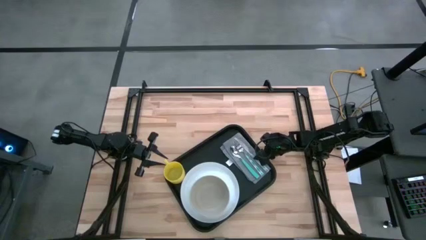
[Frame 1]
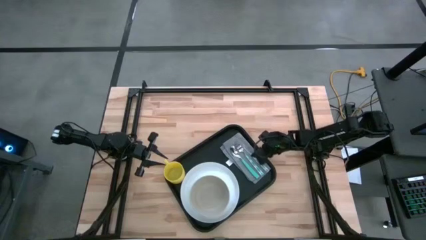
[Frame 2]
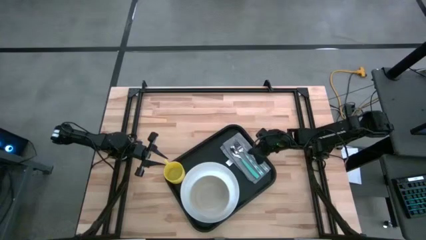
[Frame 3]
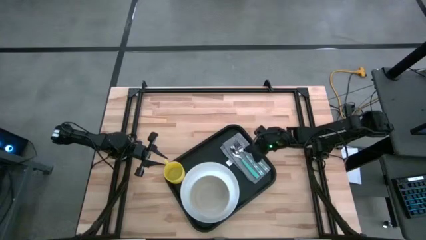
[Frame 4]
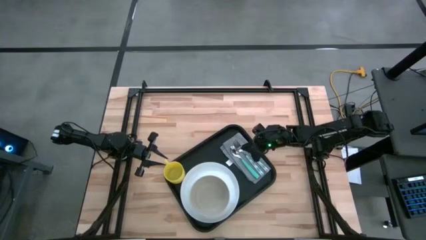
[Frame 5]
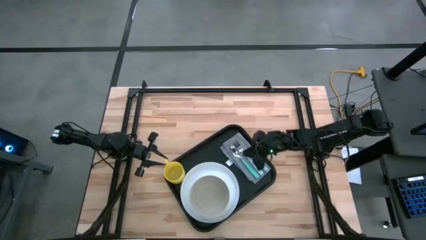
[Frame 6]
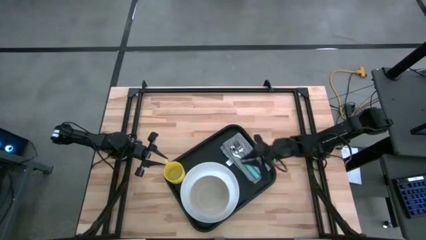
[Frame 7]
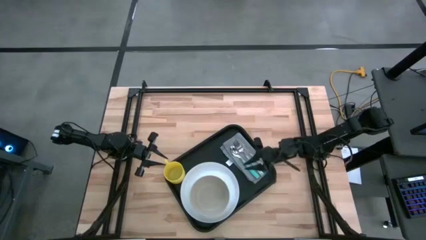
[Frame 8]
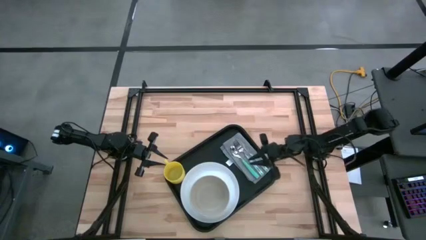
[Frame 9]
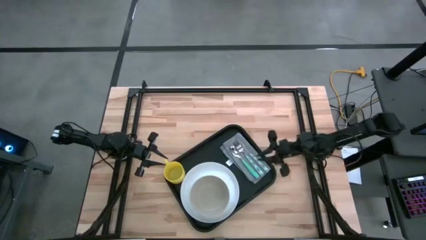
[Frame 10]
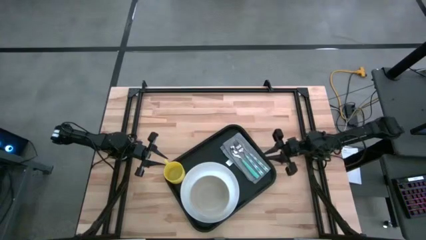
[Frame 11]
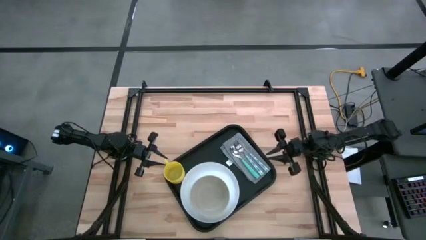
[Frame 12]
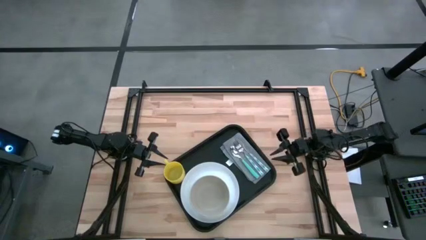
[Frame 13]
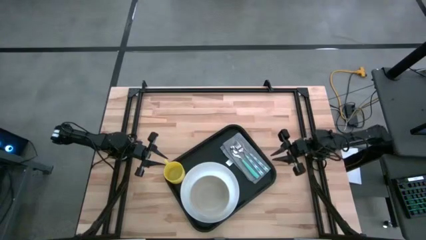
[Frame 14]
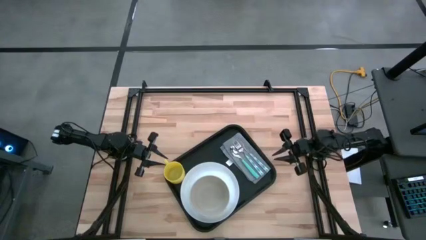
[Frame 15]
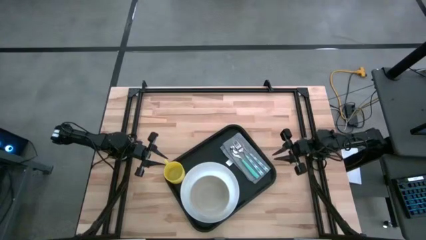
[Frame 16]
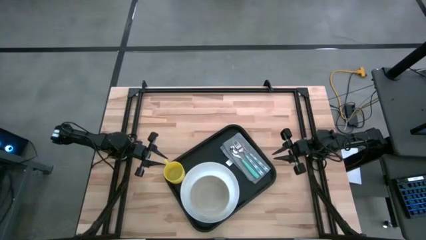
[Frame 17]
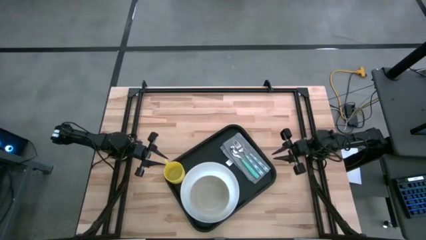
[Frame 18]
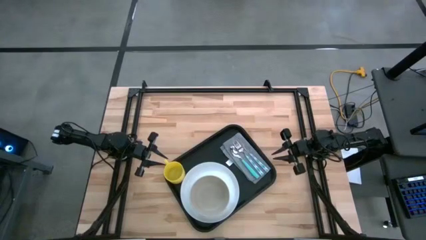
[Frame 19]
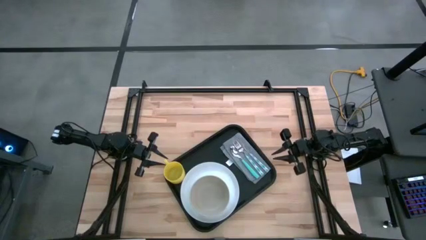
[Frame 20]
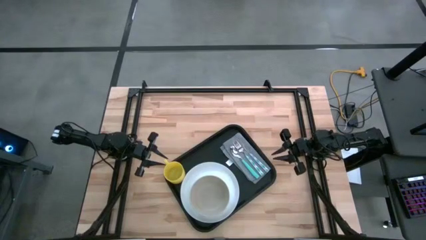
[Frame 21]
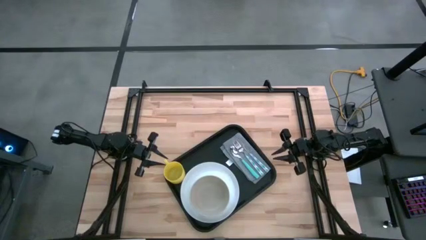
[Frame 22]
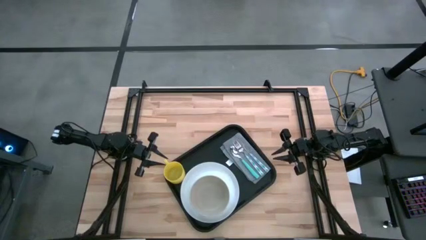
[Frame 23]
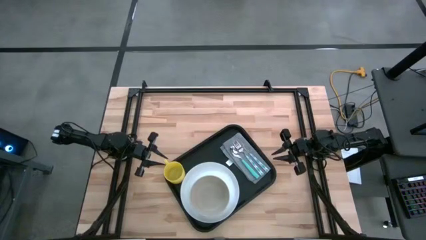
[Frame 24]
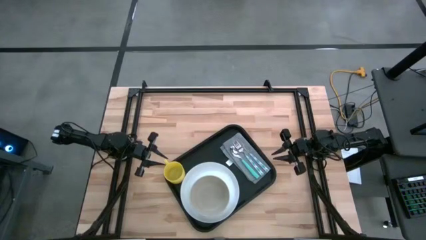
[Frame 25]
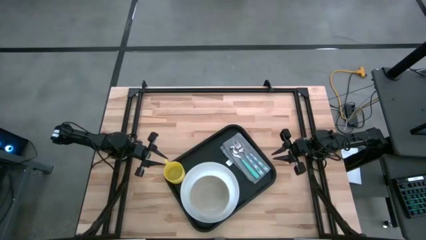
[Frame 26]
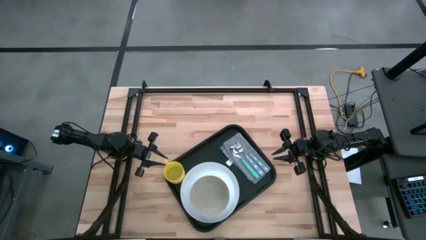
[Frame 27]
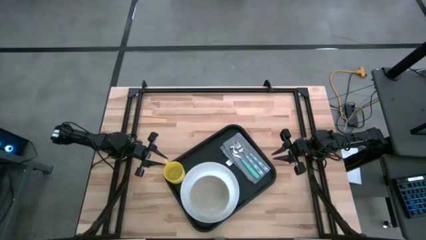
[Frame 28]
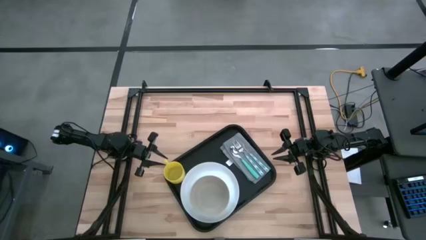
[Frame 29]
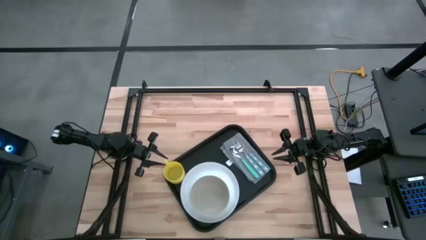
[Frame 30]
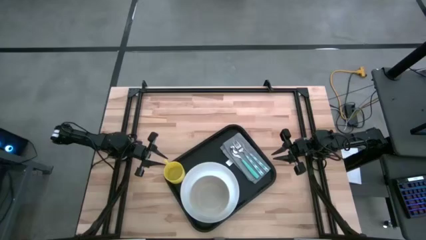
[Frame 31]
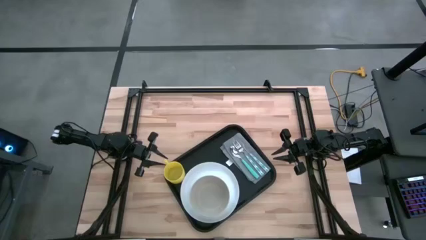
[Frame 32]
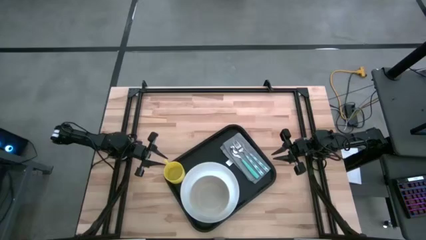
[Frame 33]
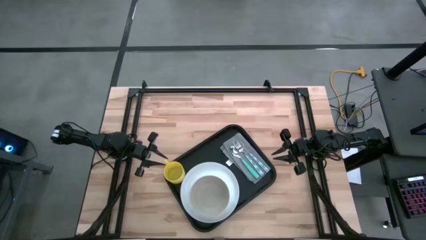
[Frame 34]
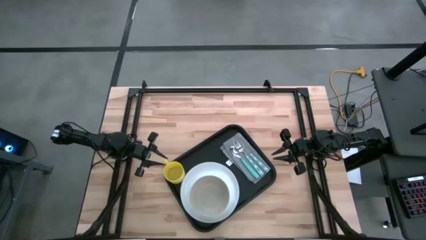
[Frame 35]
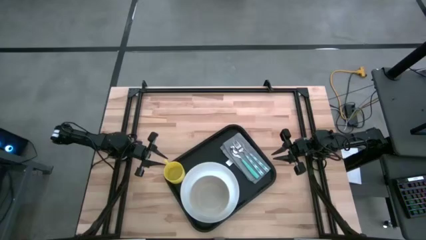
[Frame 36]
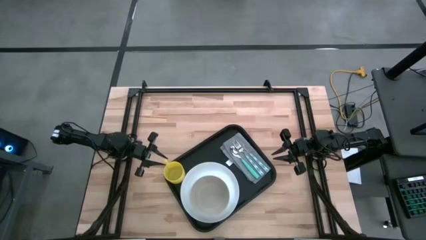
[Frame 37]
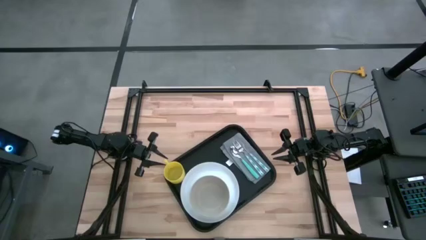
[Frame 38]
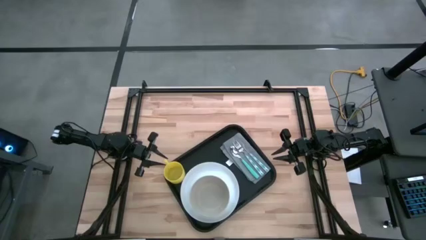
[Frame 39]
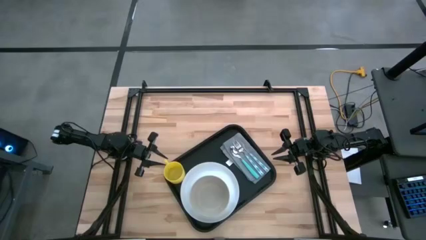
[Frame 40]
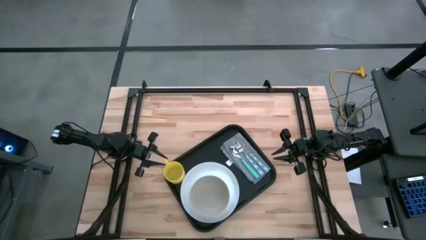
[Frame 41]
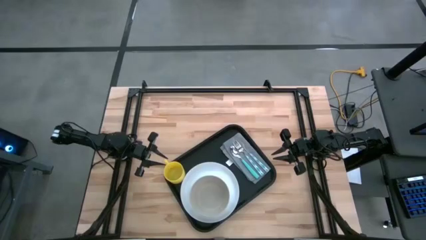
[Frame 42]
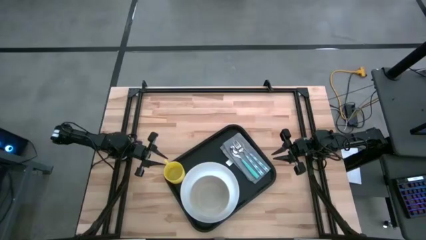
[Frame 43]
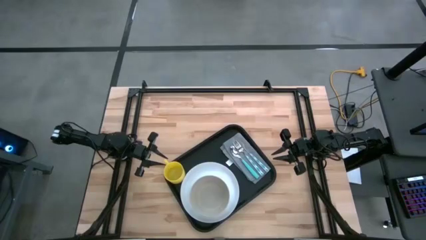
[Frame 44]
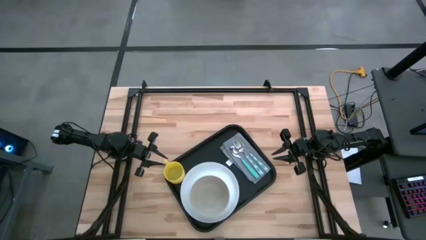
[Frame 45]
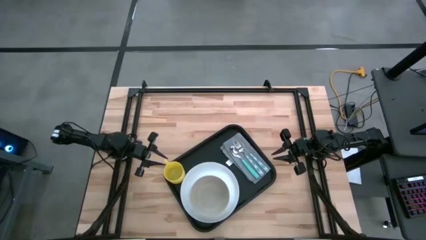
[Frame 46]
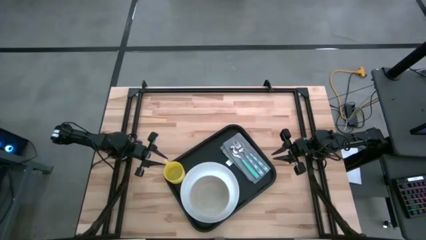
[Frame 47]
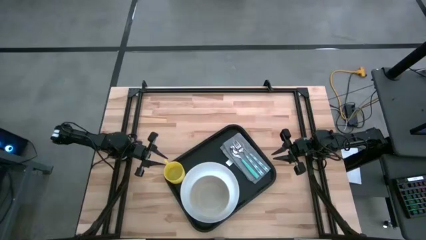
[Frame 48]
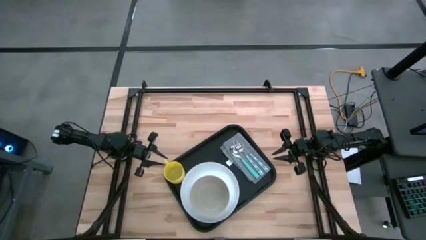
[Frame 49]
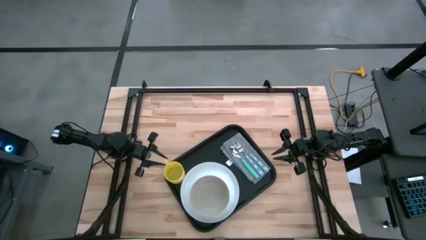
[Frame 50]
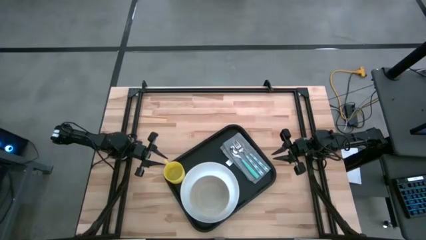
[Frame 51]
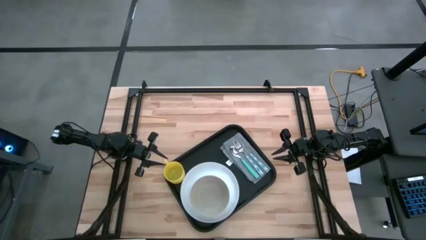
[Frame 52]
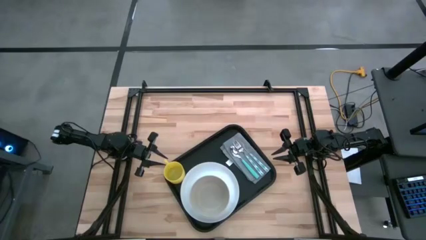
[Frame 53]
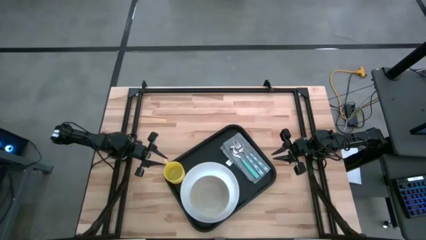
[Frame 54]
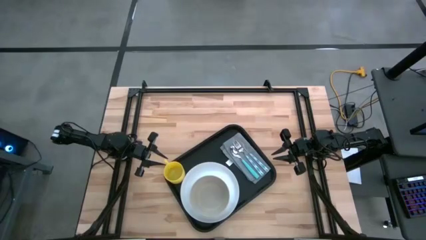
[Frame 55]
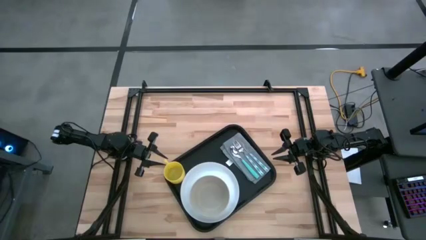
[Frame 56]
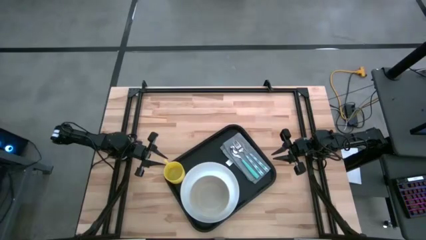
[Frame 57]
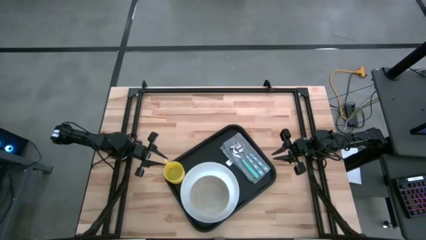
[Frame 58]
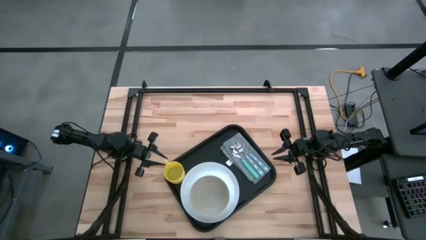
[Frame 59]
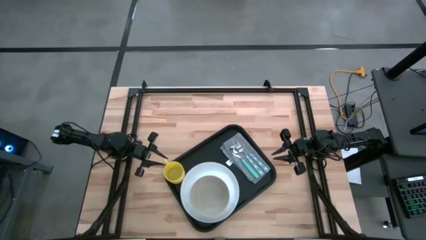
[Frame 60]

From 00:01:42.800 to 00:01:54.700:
Task: Set up tray
Return to Home Position
